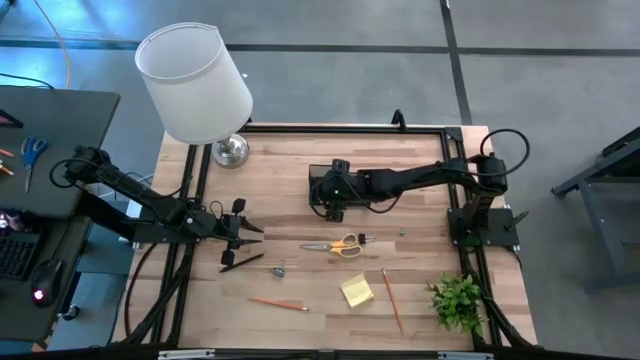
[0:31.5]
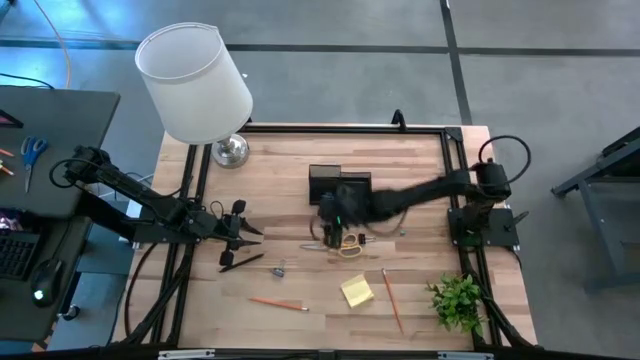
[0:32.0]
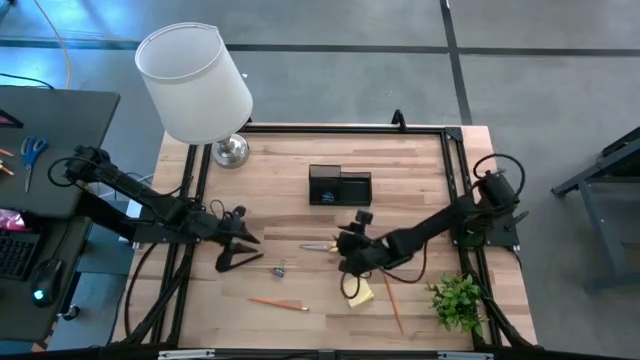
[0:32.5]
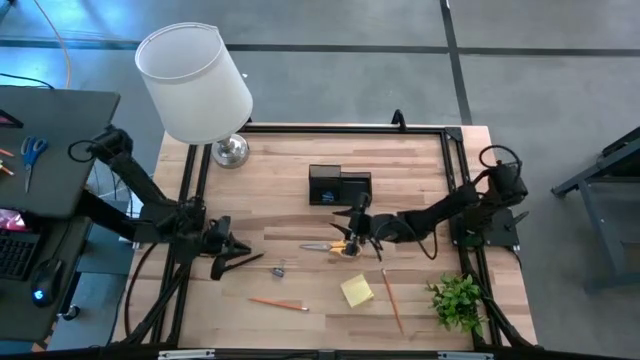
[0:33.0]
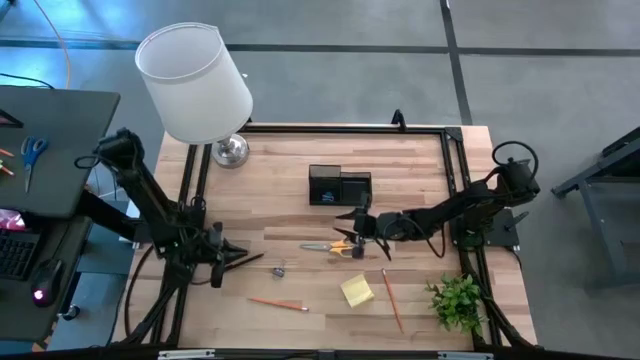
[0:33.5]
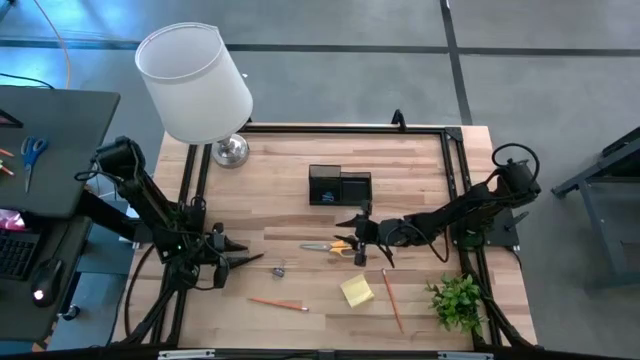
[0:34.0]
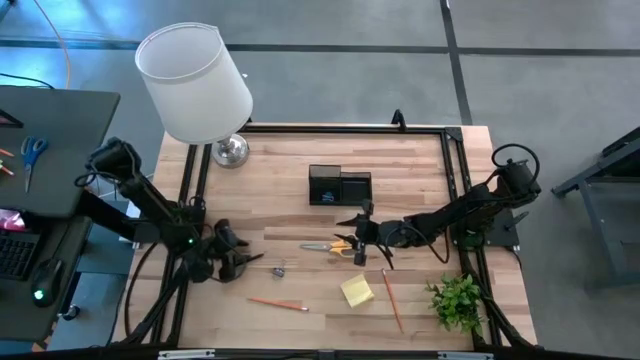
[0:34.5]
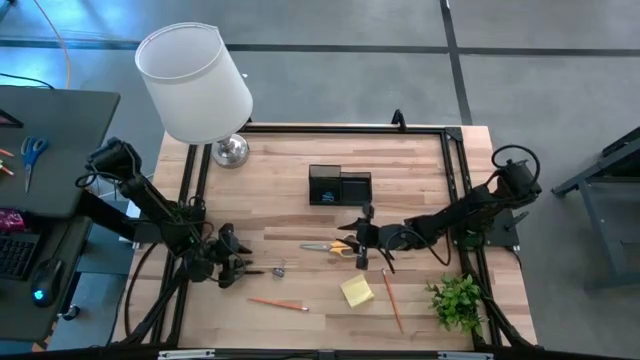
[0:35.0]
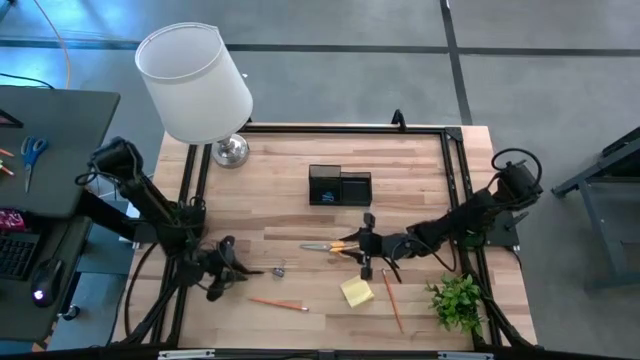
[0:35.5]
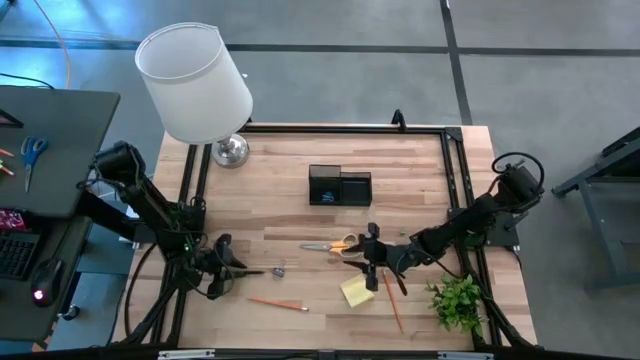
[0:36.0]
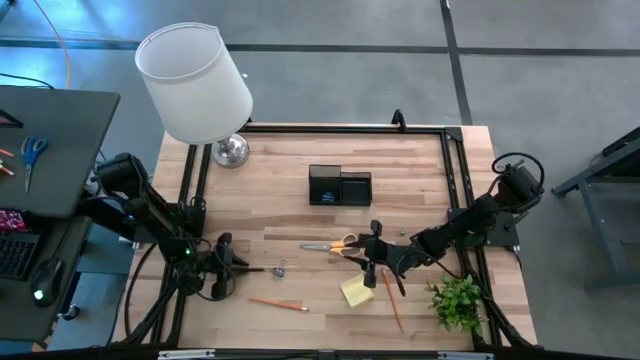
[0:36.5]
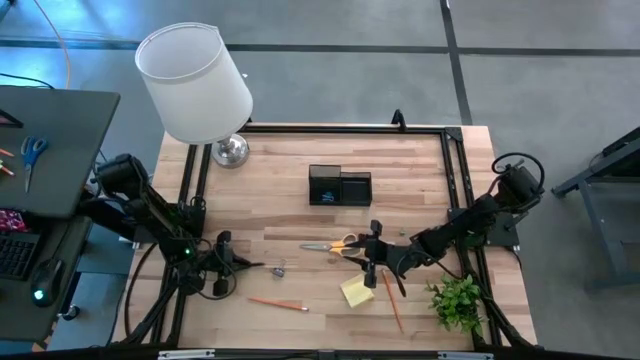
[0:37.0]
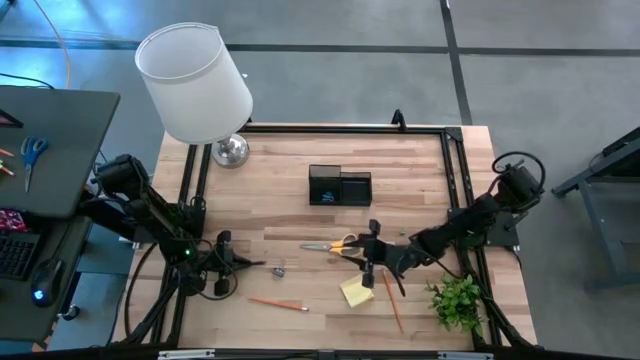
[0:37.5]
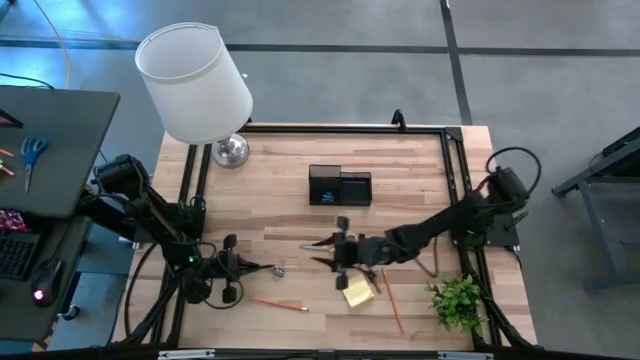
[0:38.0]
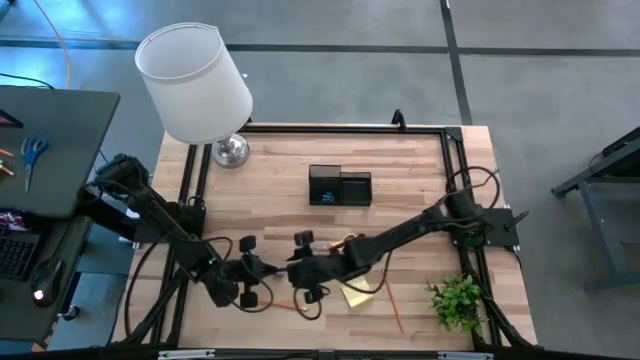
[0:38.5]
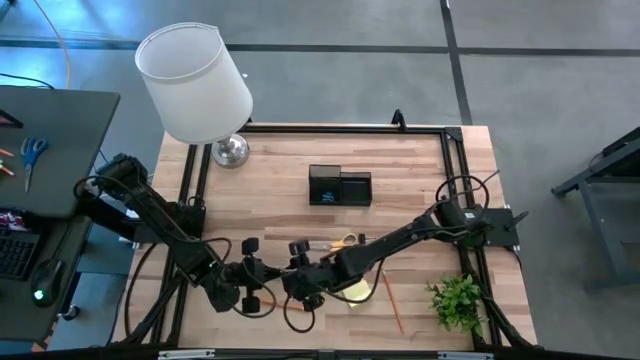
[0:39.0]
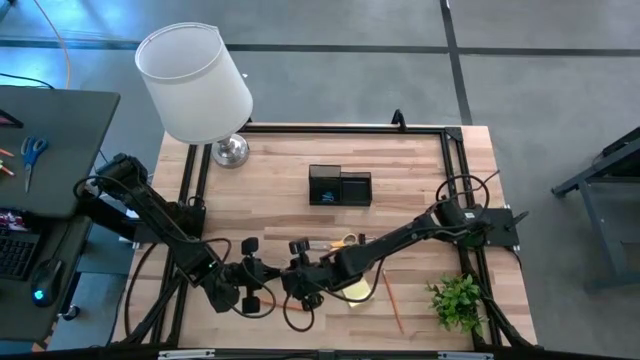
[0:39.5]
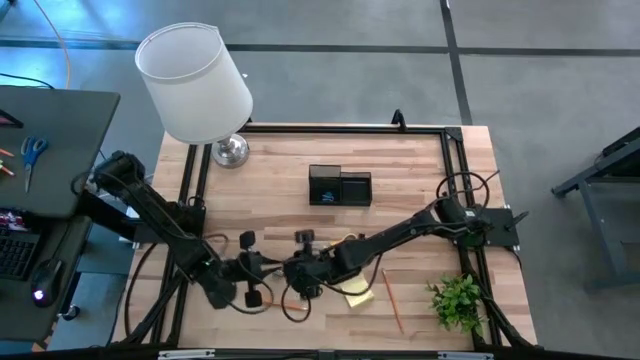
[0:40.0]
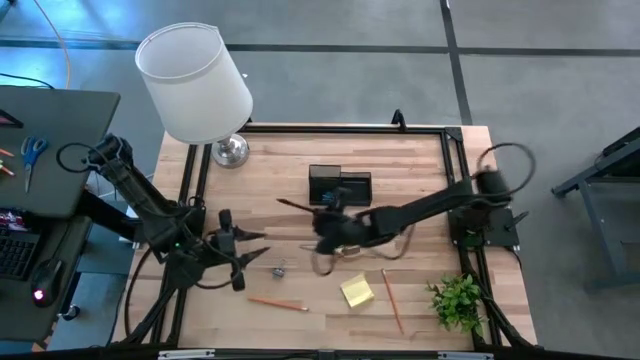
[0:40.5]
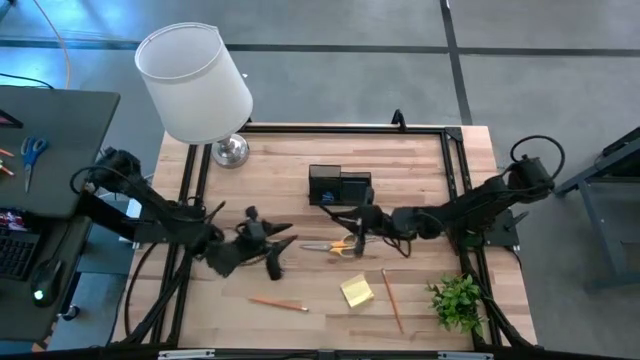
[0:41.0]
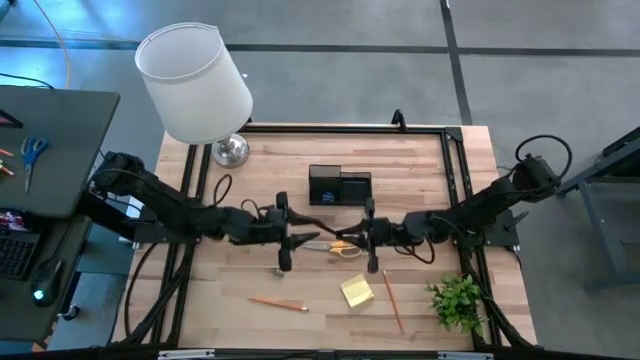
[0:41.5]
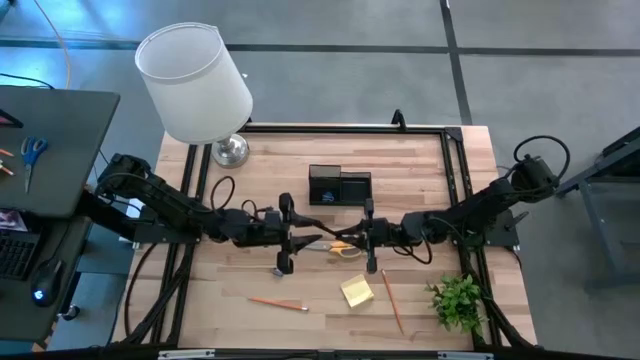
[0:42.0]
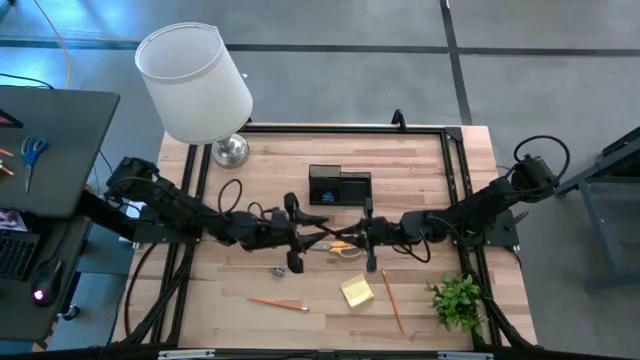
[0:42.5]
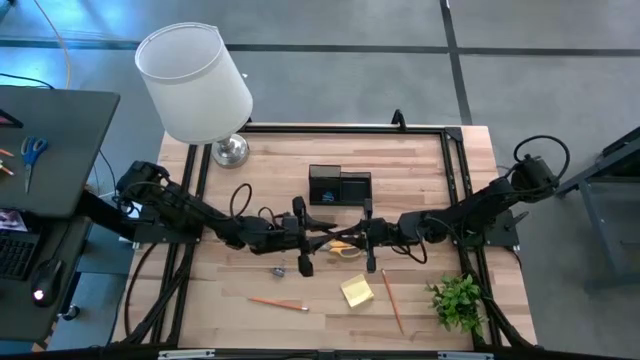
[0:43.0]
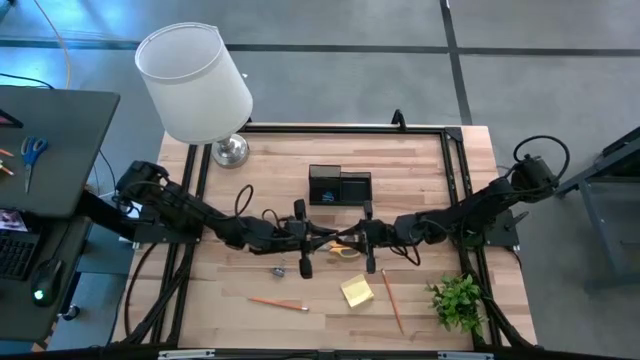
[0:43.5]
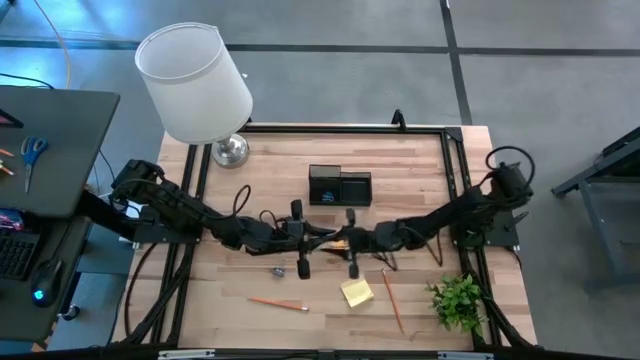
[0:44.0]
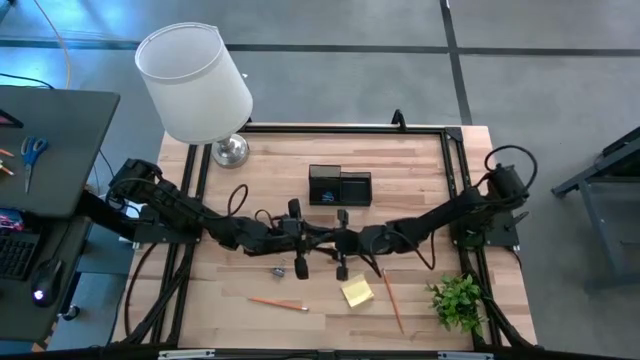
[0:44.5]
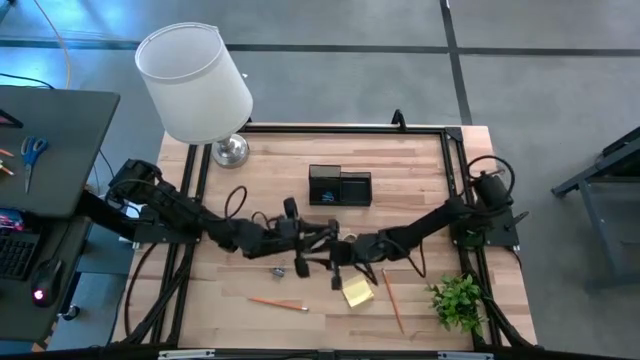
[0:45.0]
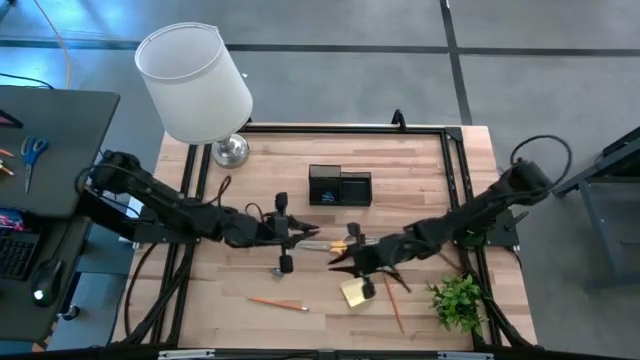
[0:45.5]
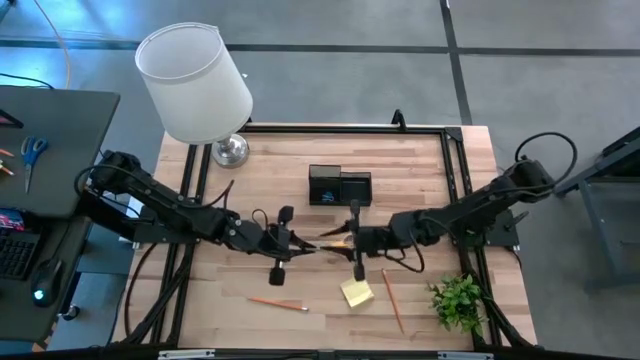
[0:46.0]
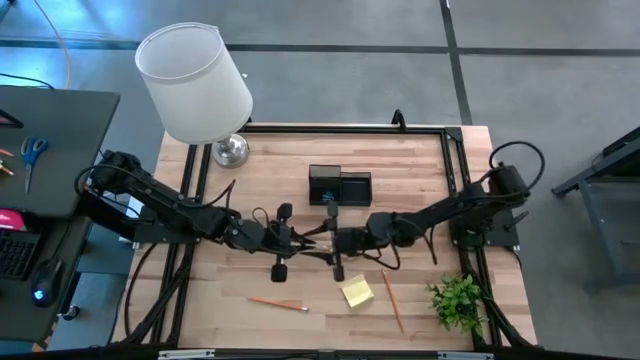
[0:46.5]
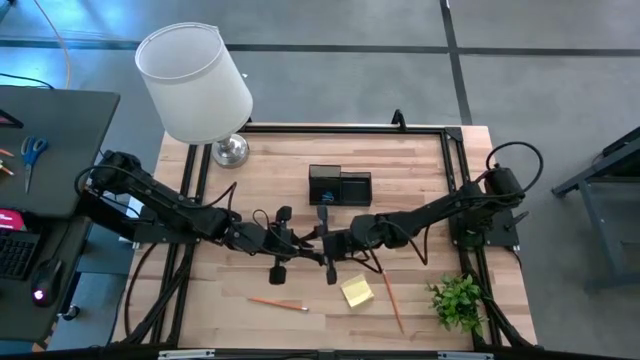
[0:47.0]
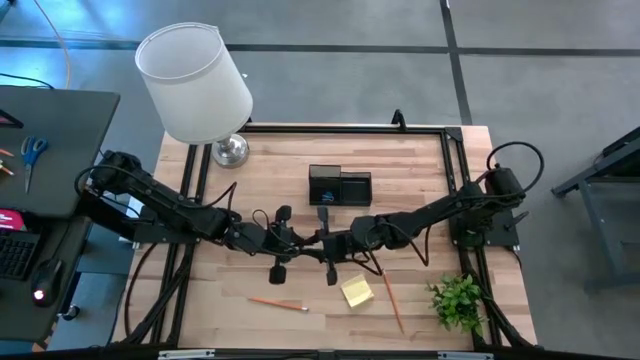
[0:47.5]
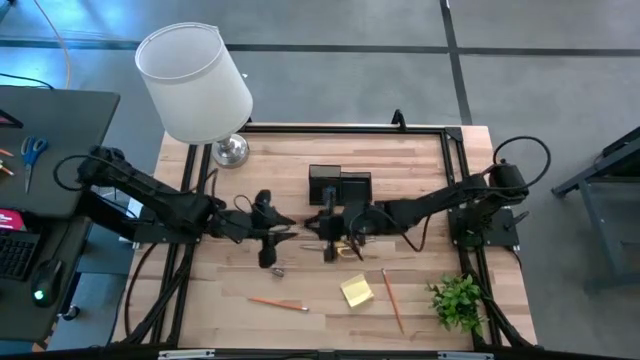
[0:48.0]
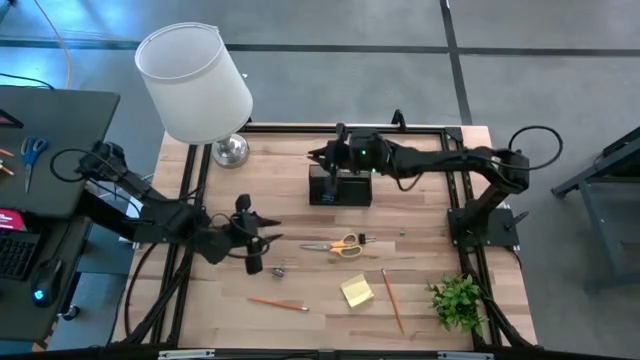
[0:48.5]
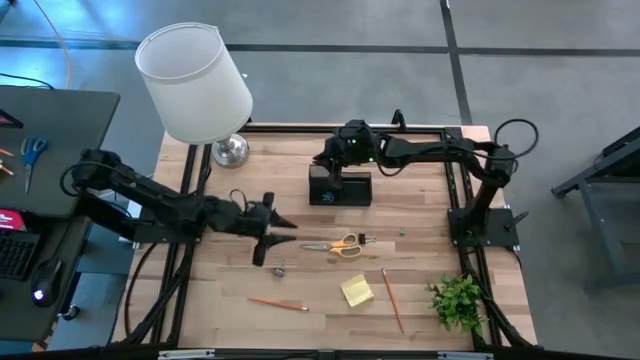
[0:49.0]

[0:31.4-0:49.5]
Task: Pick and place office supplies into organizer
Put the black pen into the black desk organizer

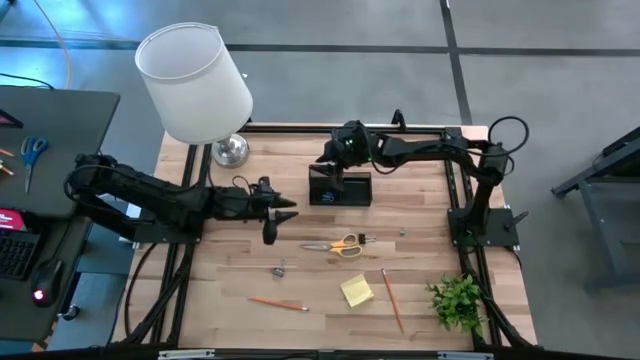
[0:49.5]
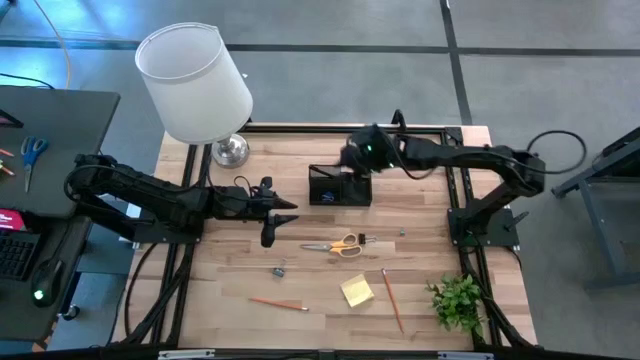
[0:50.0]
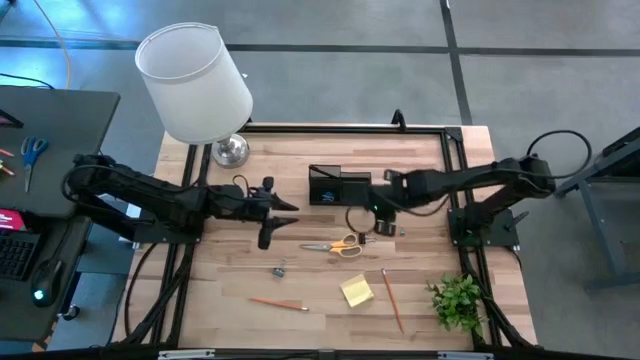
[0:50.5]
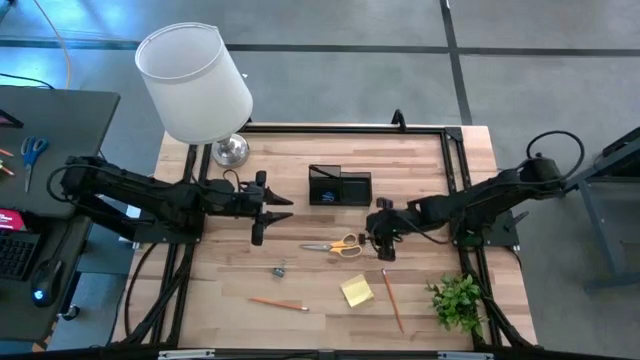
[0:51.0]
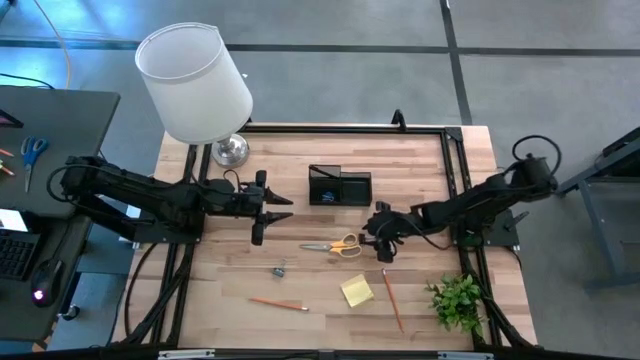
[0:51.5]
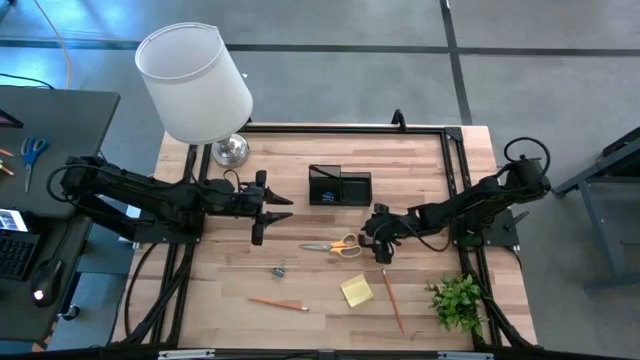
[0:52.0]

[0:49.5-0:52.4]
Put the top black binder clip into the black desk organizer

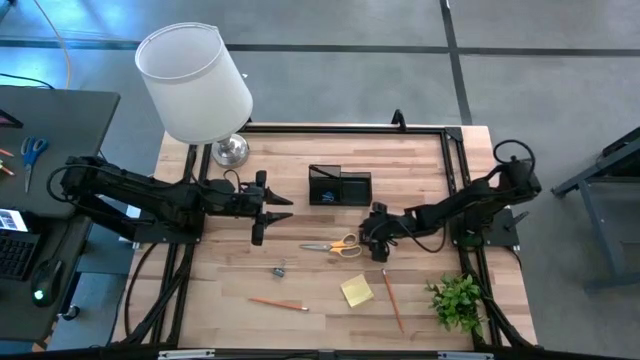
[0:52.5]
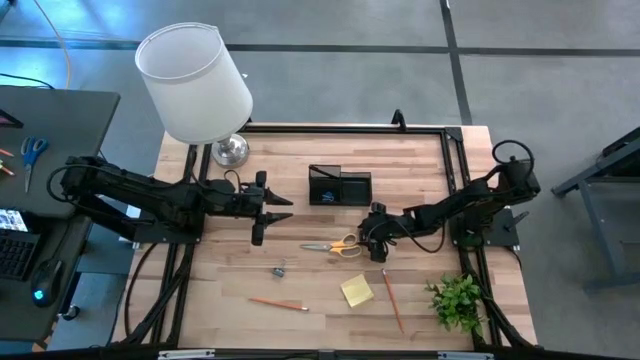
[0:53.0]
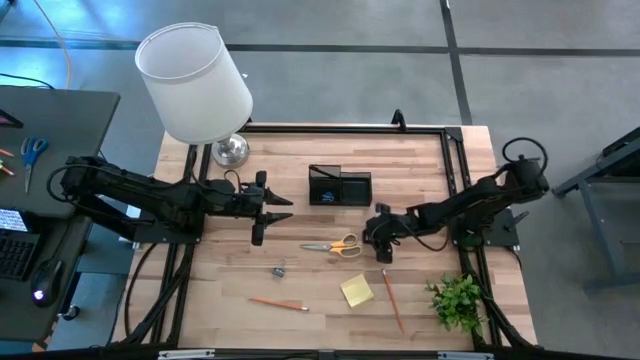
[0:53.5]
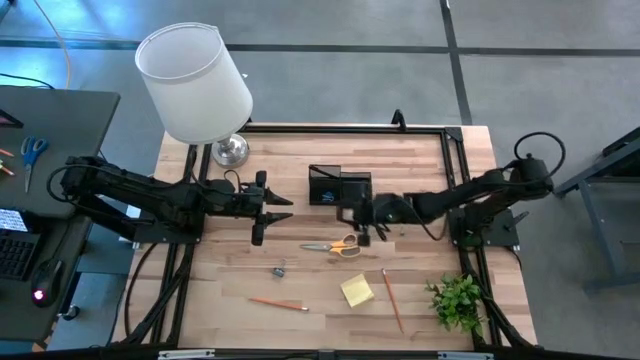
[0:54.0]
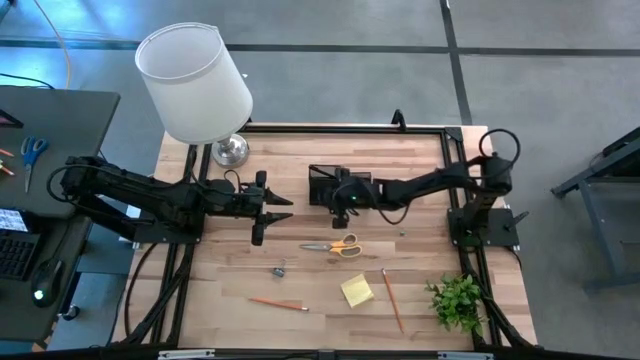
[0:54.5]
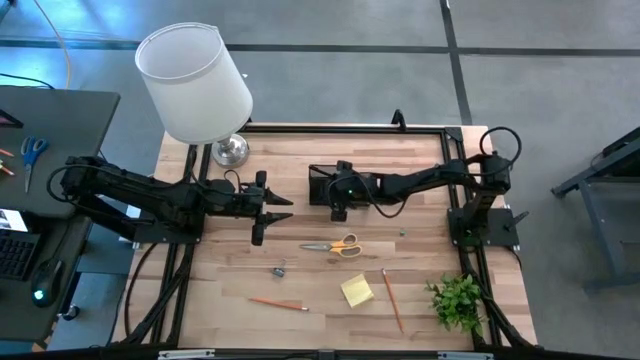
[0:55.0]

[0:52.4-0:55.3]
Put the top black binder clip into the black desk organizer
